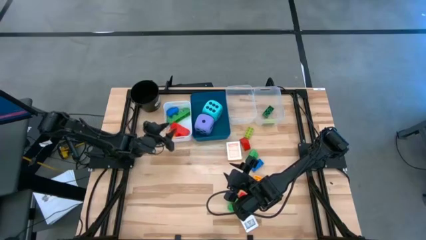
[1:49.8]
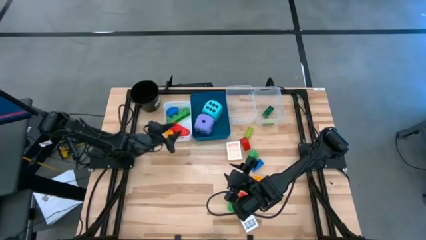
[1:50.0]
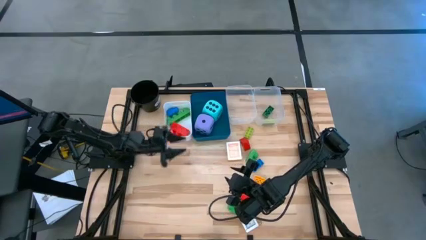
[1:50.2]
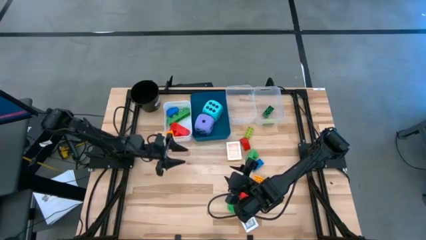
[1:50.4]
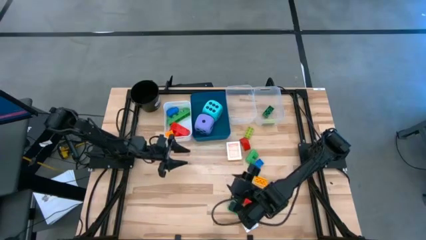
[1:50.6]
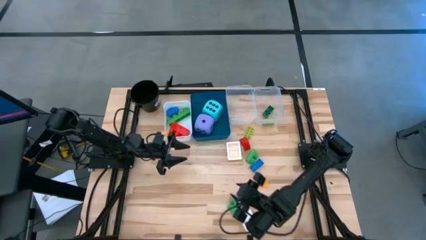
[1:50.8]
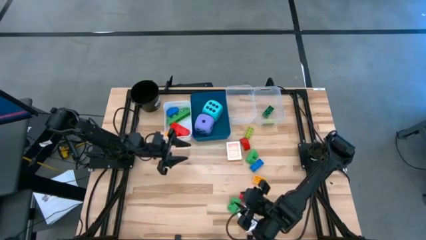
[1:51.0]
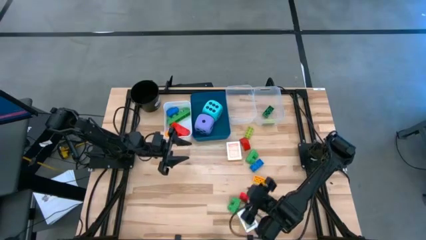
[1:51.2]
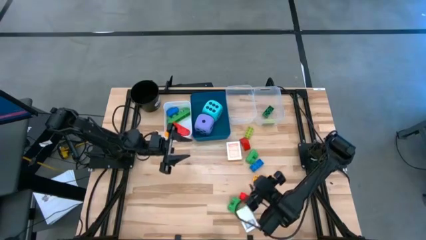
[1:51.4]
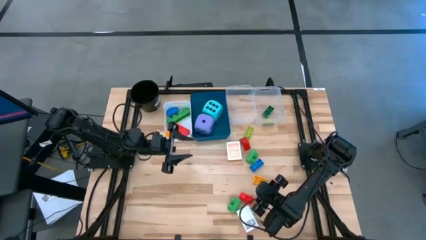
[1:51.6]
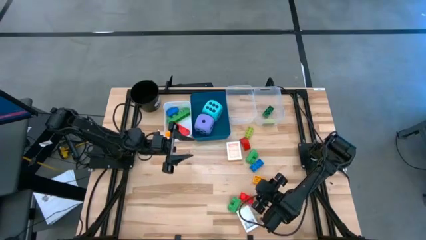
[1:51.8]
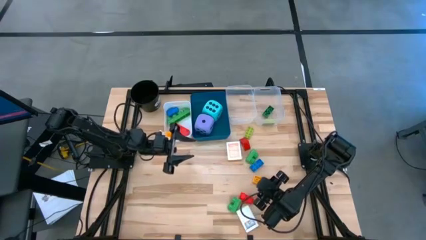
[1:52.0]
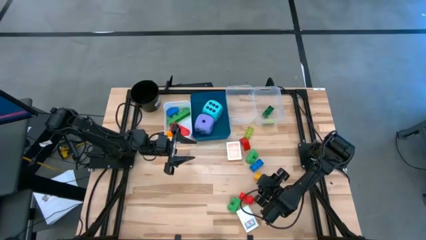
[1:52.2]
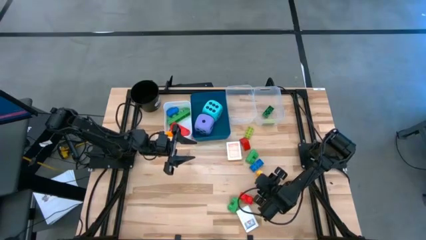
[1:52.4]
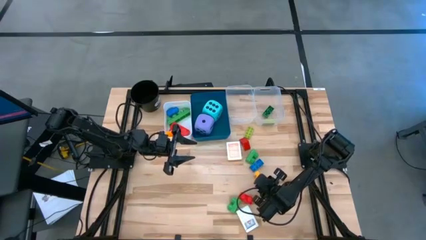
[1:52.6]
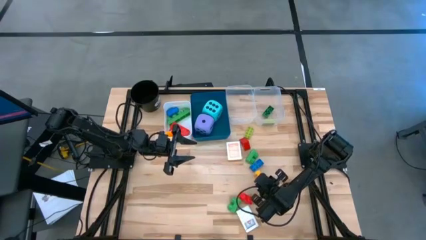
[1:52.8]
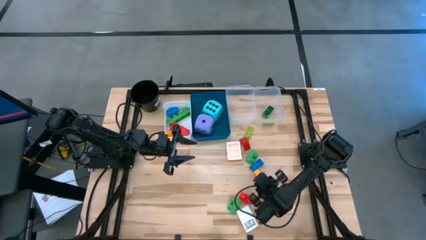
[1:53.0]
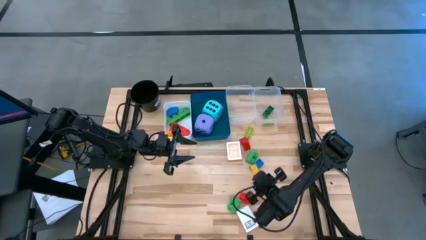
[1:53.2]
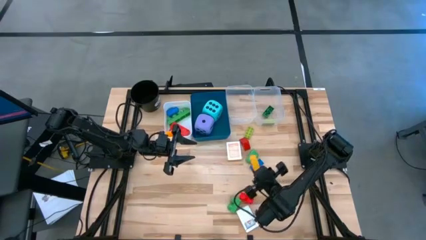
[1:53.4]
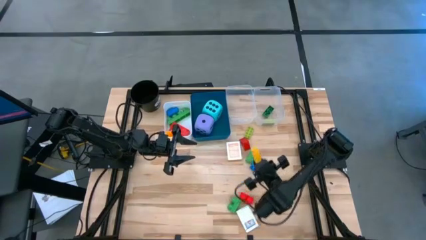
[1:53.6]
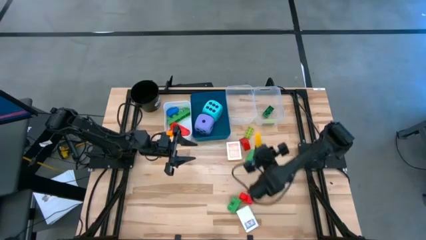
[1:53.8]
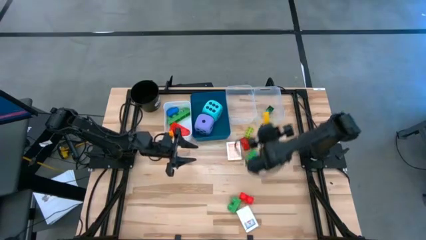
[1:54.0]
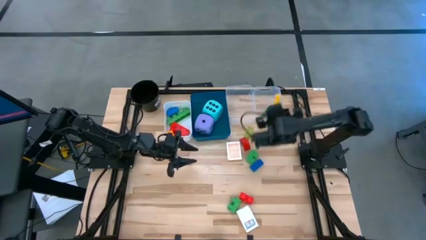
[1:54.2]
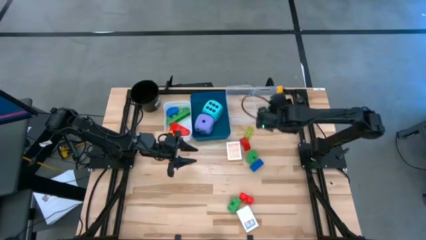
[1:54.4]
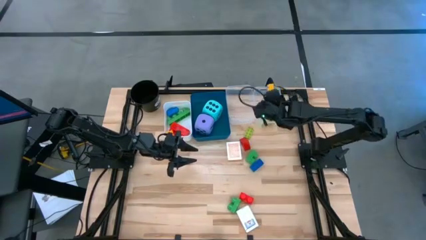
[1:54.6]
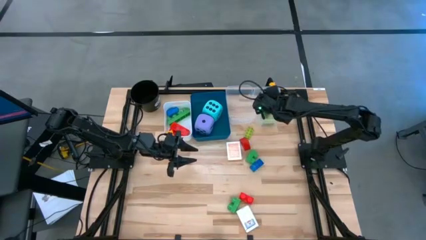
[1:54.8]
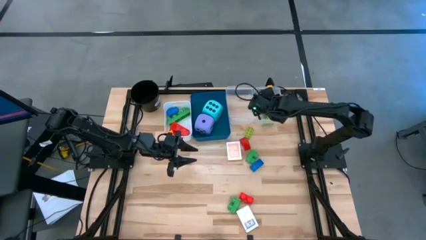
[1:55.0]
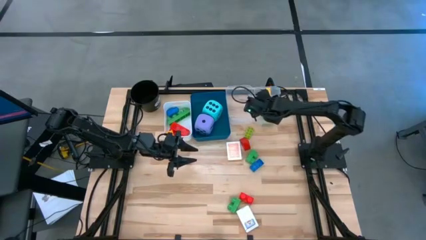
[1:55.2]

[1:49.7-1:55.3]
Task: Pick & Place Toys
Put the small yellow game piece into the right transparent bin

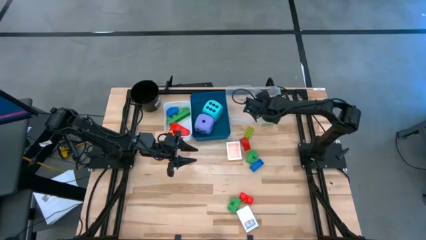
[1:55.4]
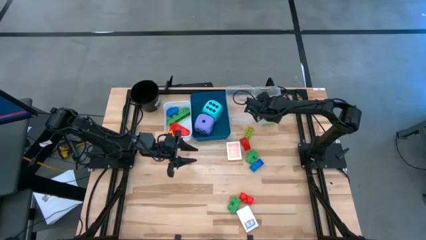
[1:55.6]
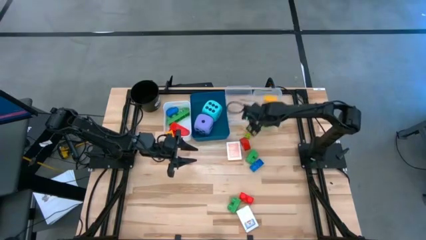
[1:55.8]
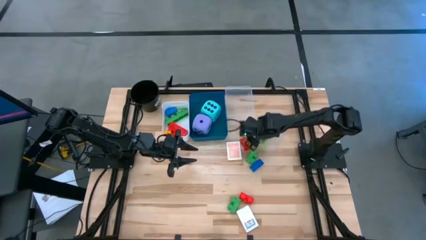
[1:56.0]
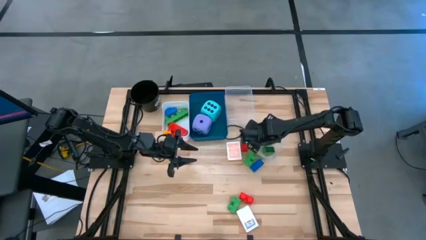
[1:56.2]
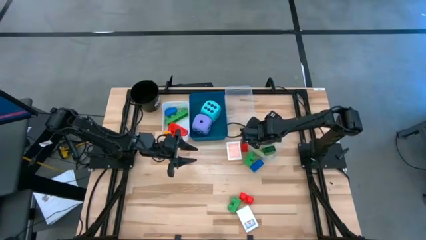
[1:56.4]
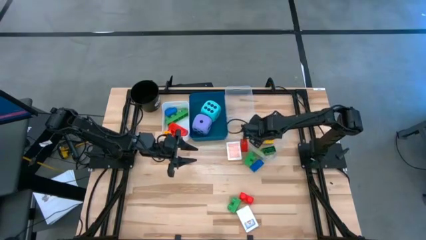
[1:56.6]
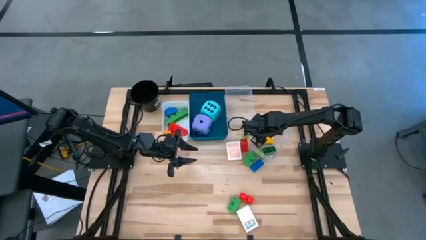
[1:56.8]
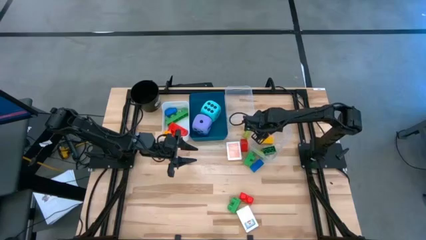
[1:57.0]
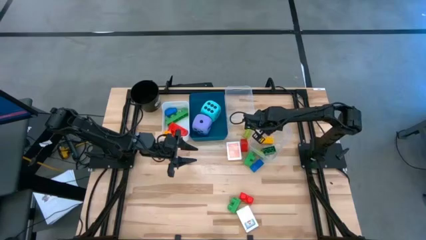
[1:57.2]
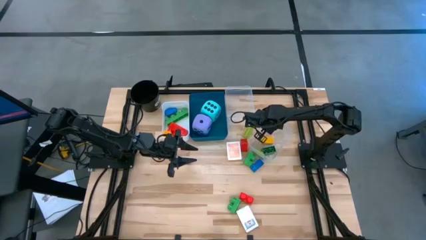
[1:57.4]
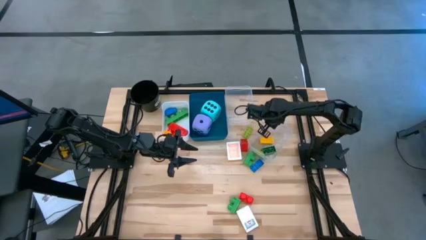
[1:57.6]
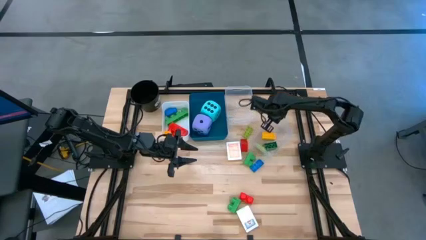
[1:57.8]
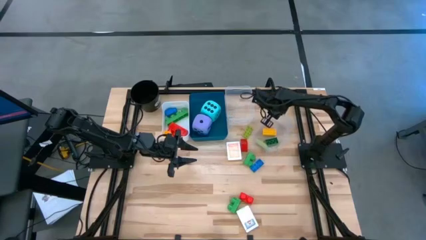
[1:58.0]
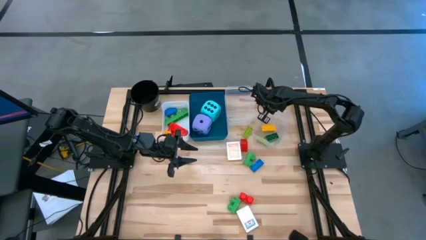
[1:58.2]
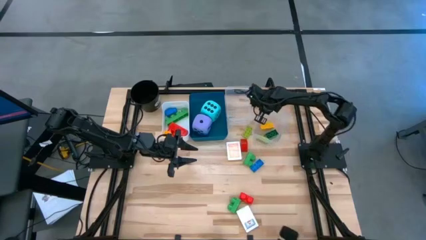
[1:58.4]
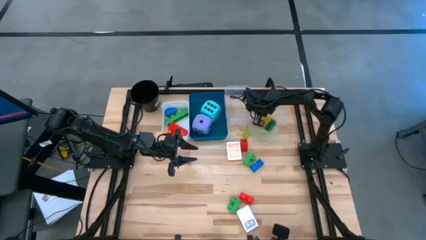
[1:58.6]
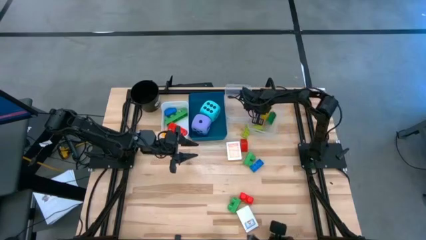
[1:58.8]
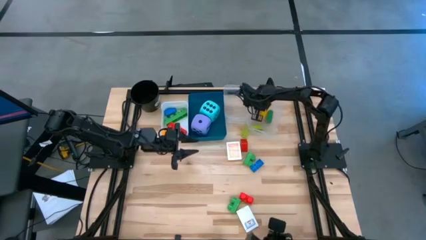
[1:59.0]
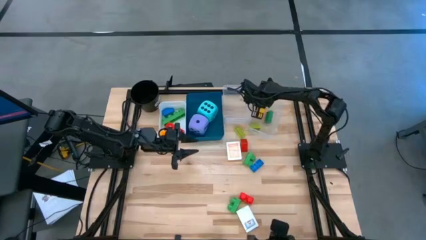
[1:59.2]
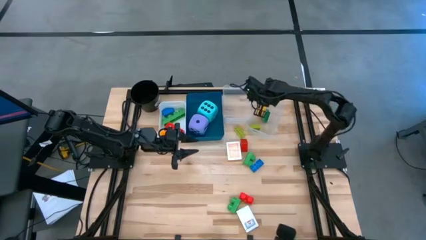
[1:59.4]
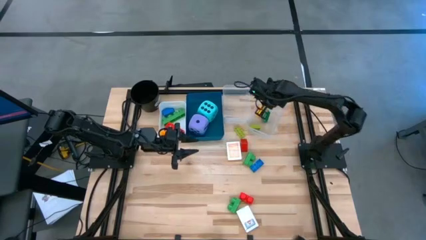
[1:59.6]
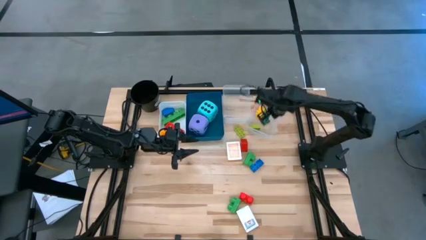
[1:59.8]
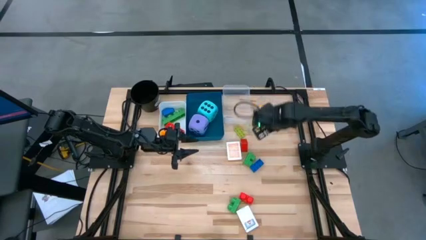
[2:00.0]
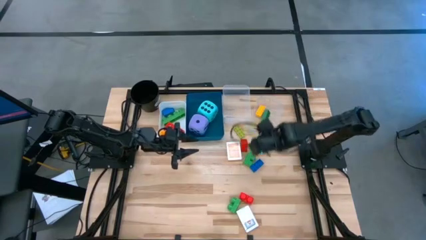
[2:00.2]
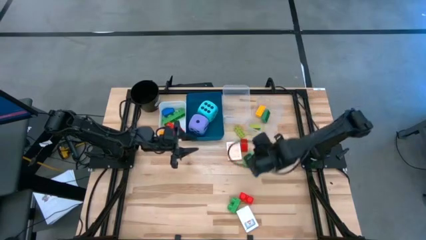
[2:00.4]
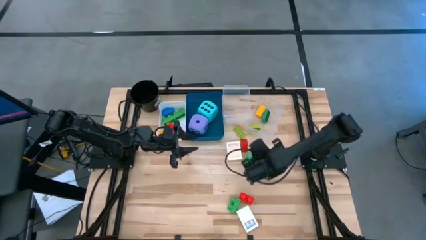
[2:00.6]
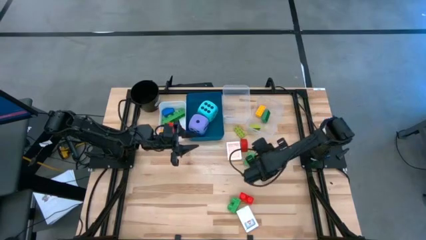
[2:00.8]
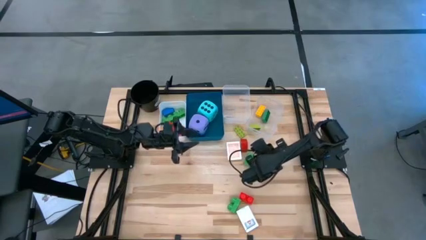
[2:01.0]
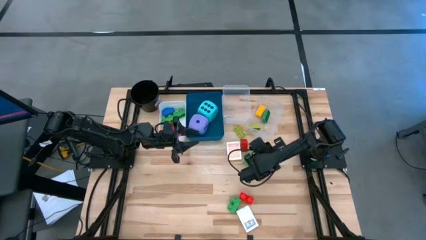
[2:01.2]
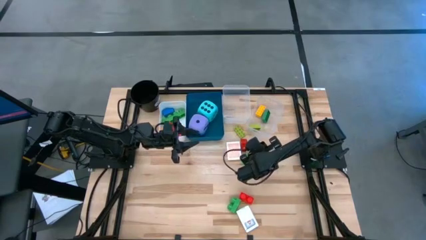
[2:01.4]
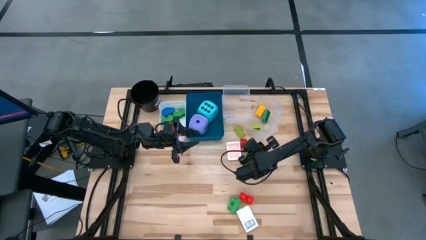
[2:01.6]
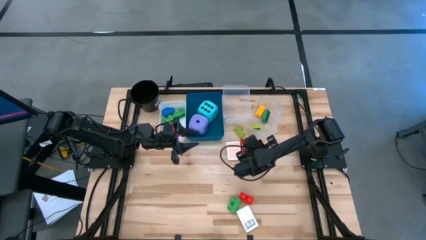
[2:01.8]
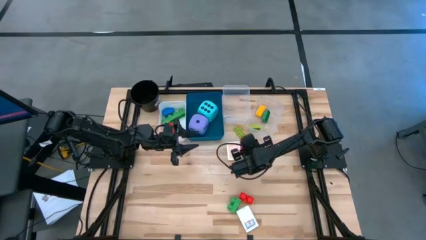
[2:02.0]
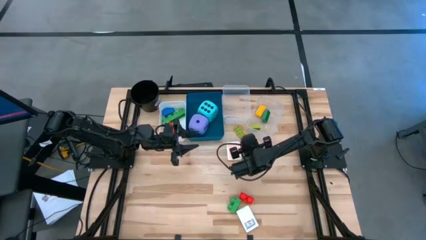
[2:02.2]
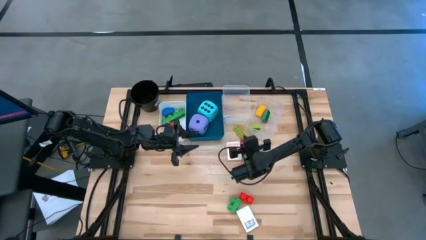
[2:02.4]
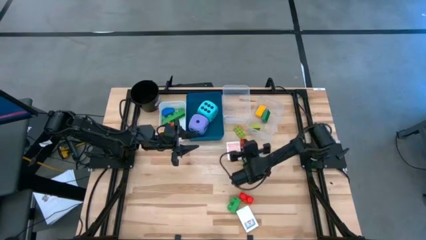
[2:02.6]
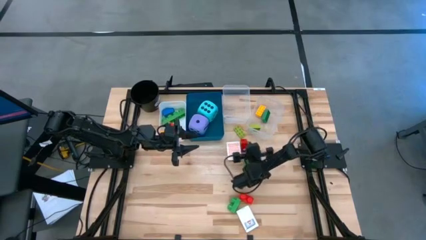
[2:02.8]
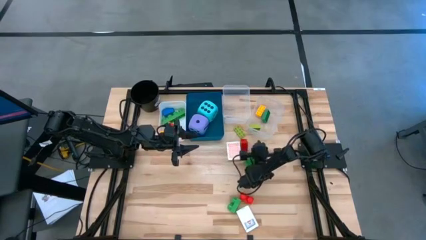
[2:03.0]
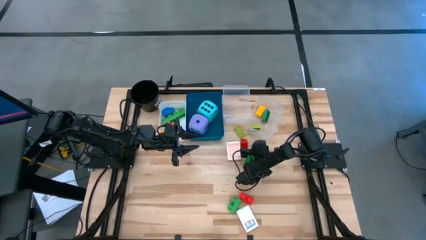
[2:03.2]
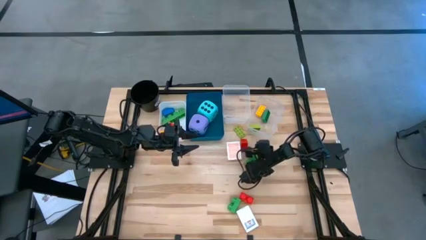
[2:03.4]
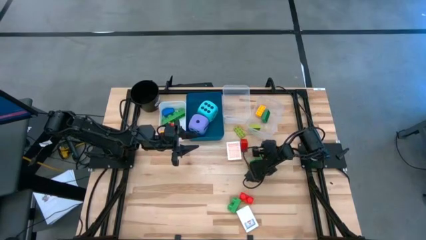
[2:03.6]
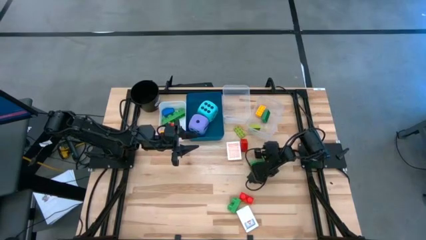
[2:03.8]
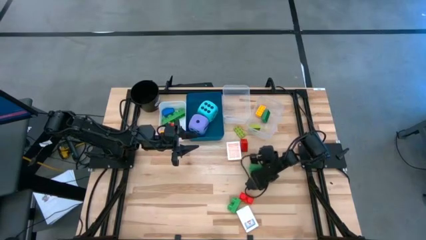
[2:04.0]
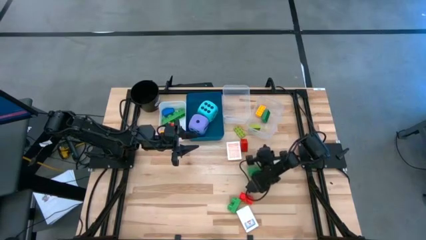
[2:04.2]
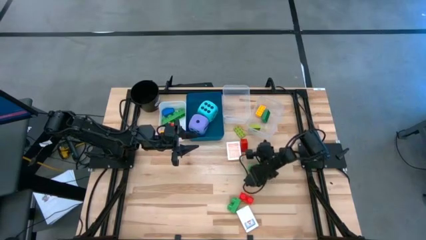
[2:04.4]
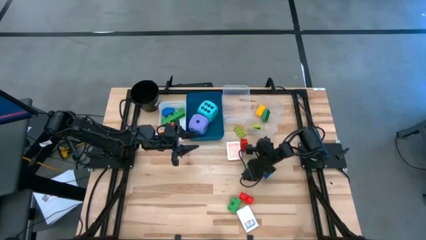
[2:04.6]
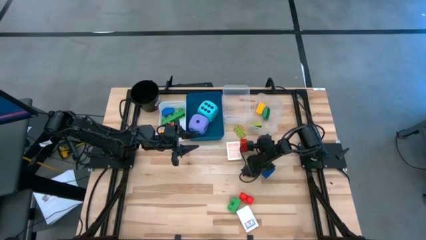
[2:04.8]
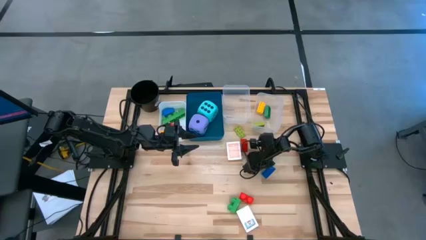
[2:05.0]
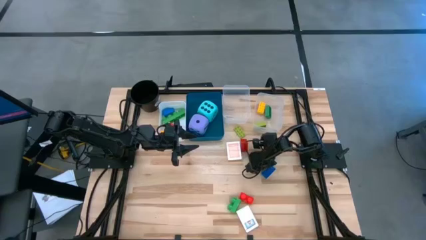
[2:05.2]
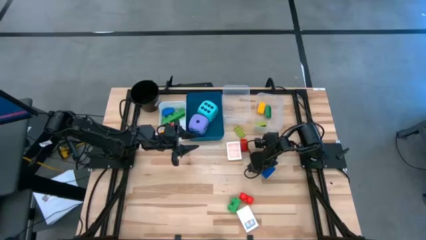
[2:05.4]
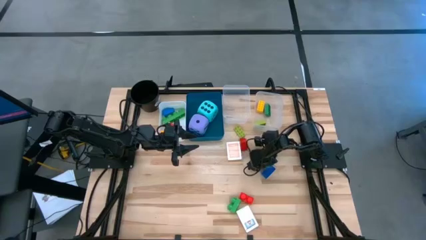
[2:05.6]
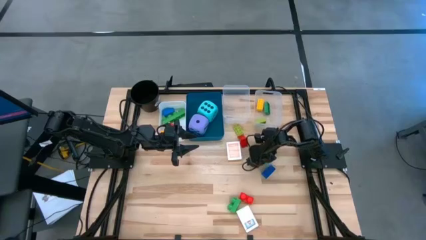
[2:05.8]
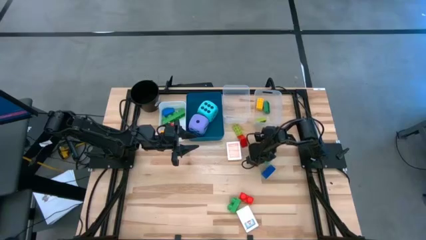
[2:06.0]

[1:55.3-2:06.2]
Adjust the right transparent bin
